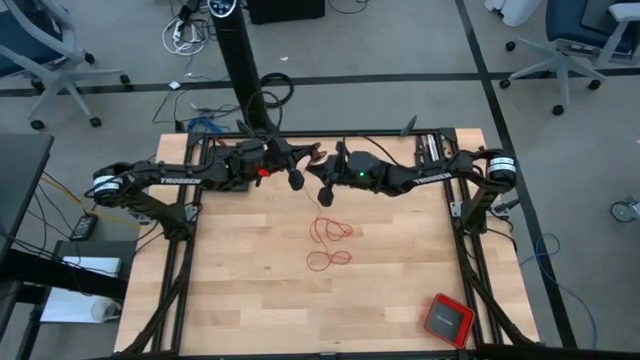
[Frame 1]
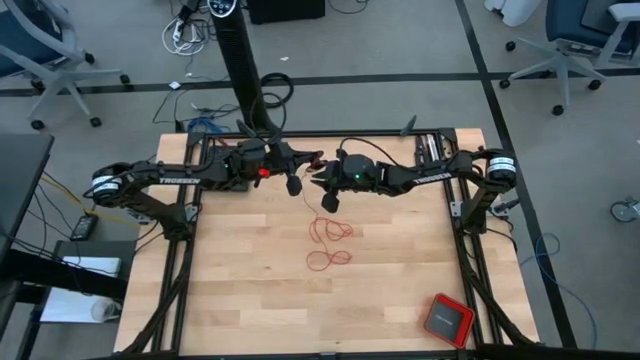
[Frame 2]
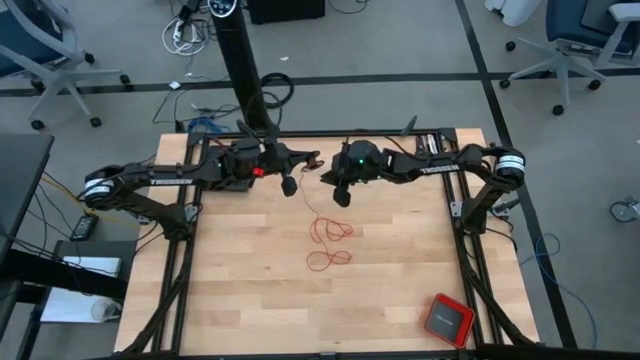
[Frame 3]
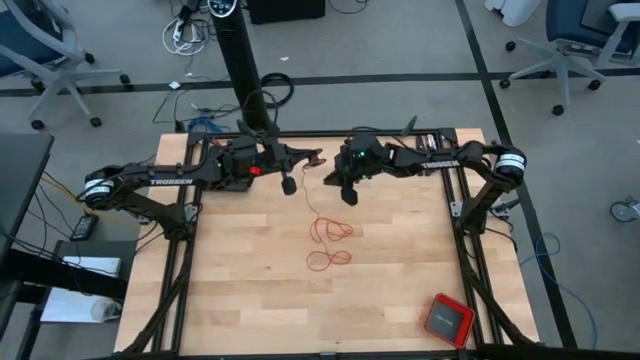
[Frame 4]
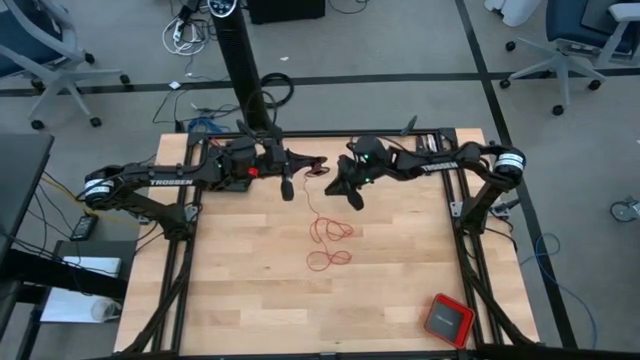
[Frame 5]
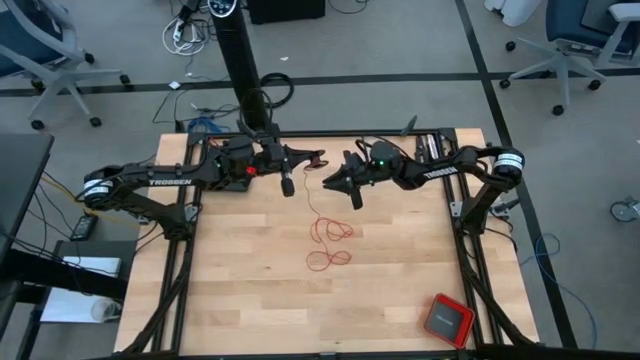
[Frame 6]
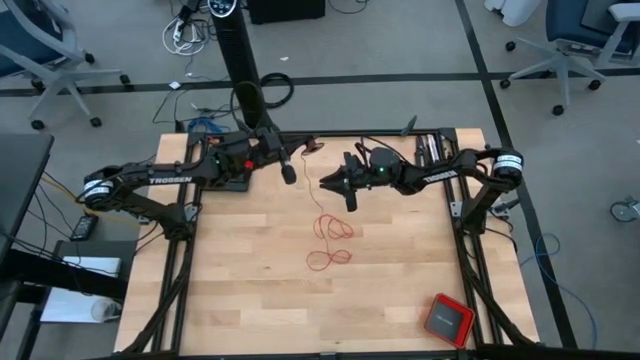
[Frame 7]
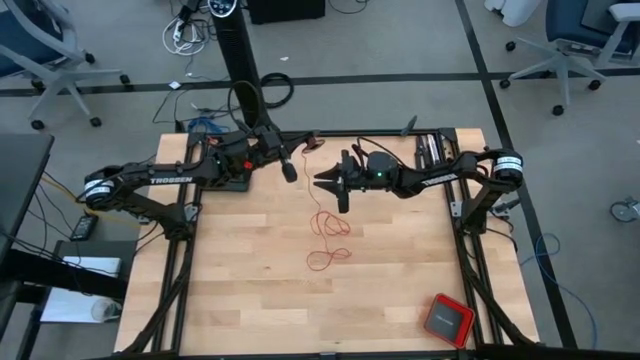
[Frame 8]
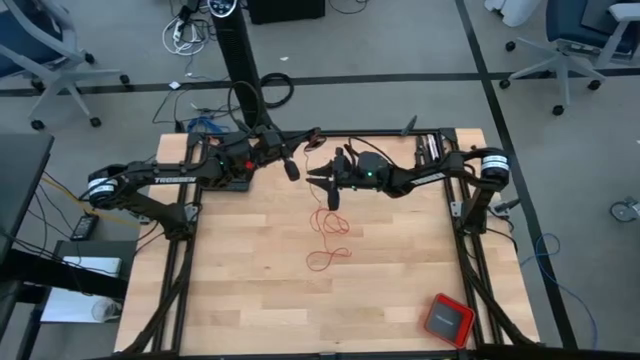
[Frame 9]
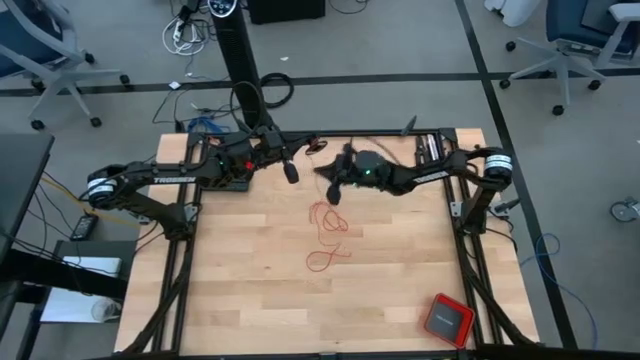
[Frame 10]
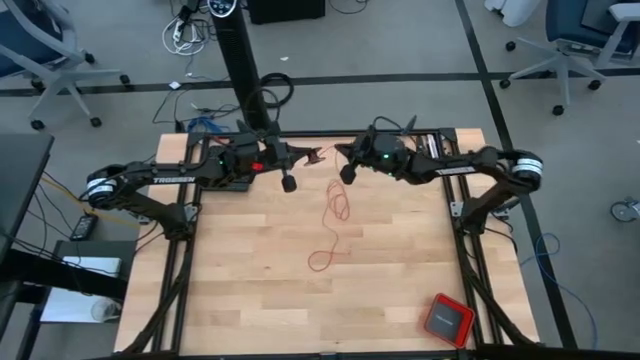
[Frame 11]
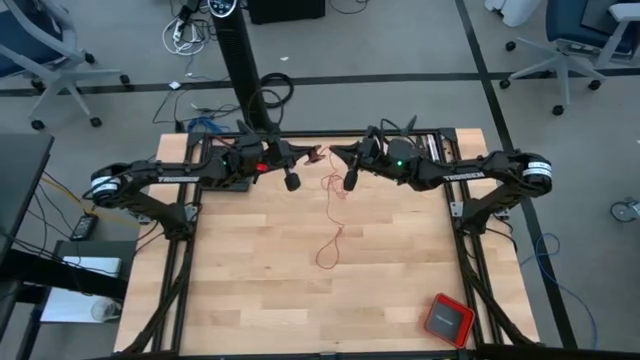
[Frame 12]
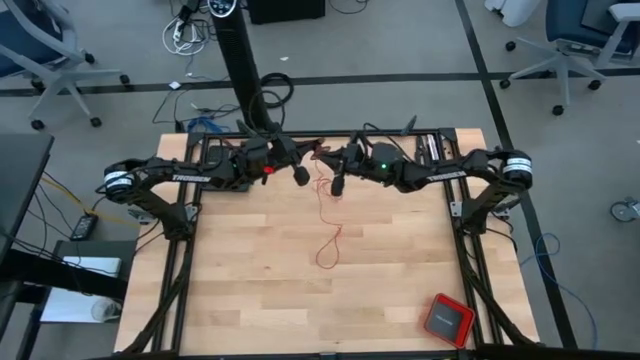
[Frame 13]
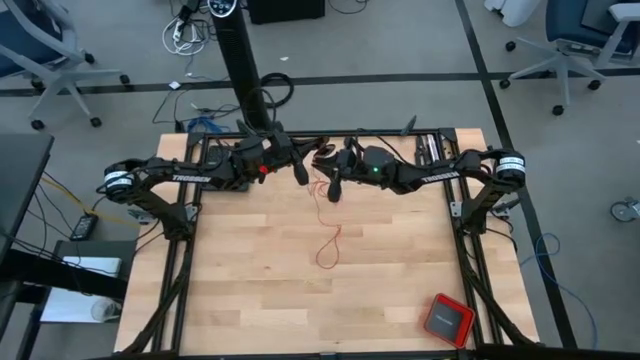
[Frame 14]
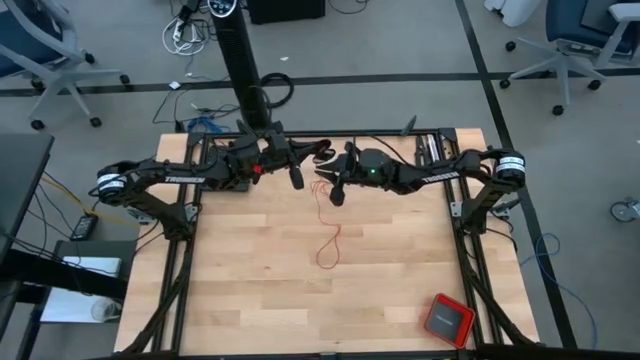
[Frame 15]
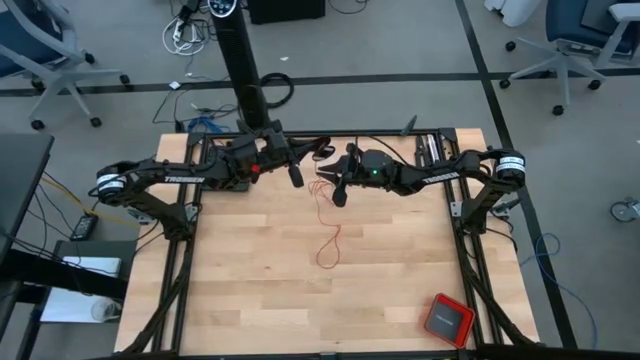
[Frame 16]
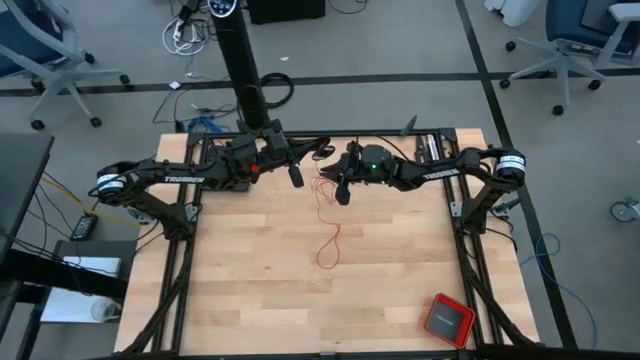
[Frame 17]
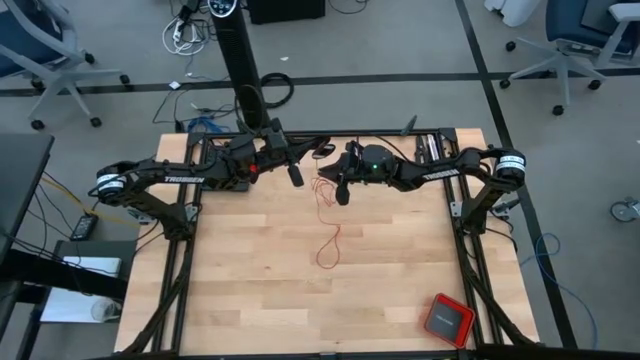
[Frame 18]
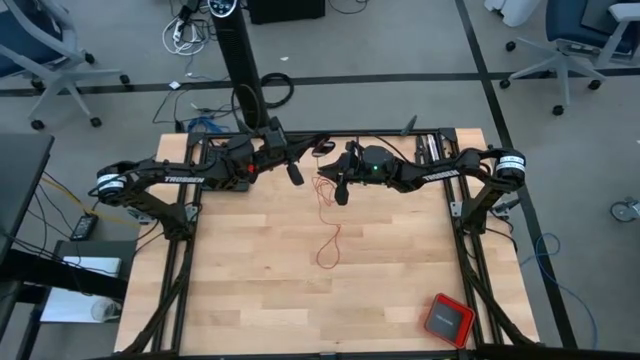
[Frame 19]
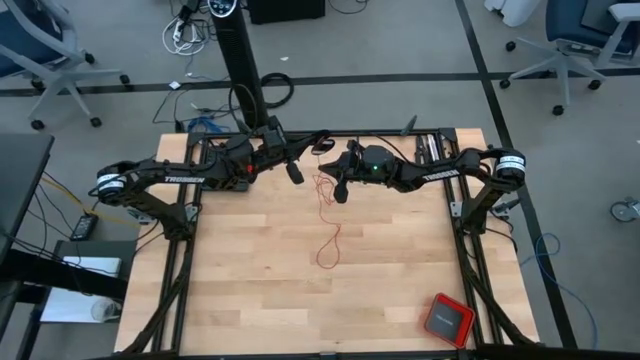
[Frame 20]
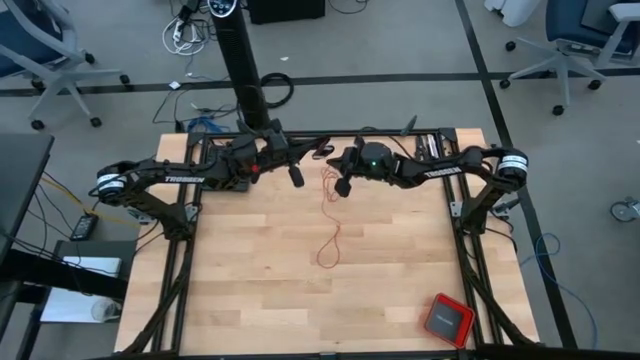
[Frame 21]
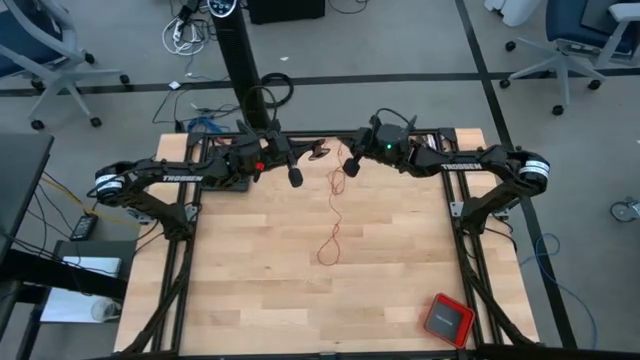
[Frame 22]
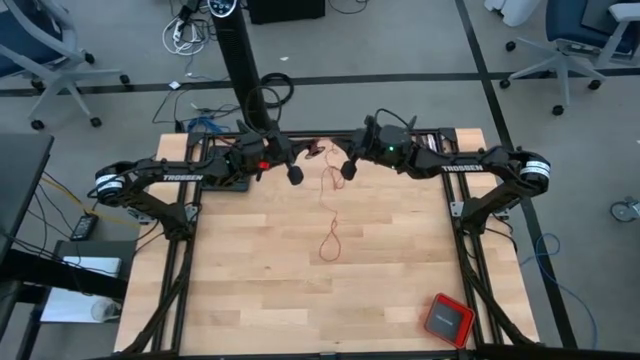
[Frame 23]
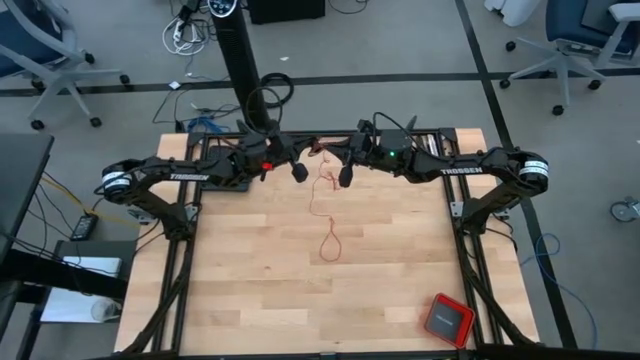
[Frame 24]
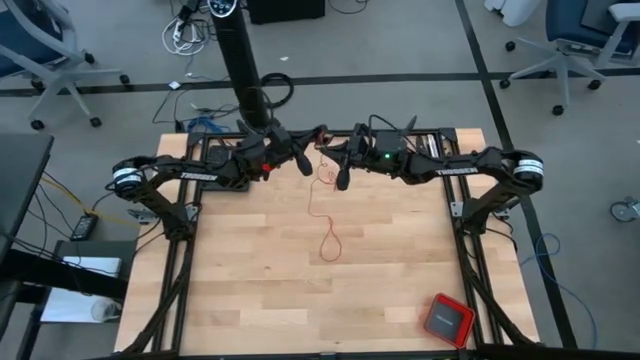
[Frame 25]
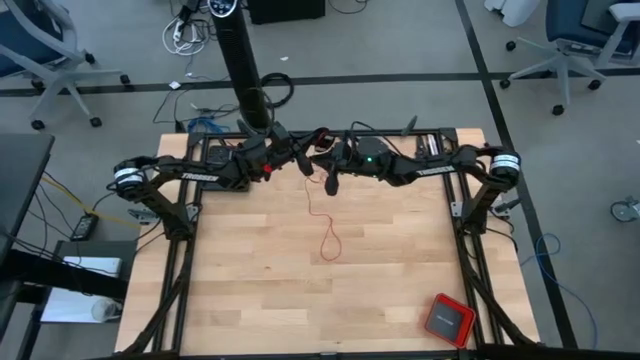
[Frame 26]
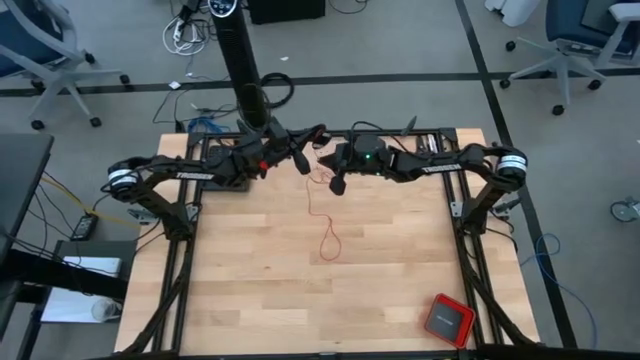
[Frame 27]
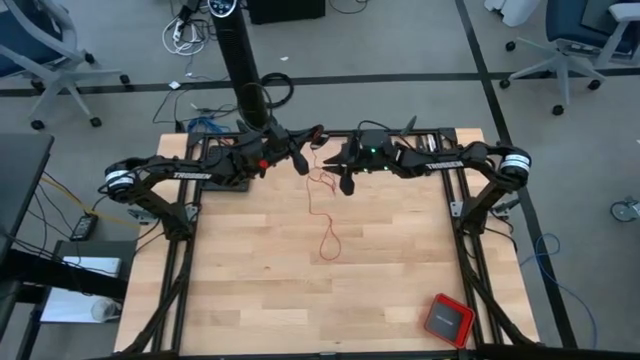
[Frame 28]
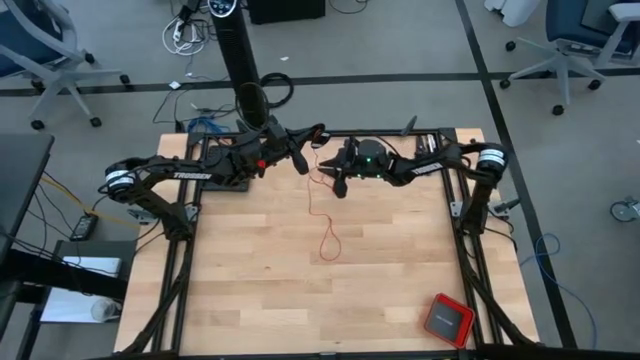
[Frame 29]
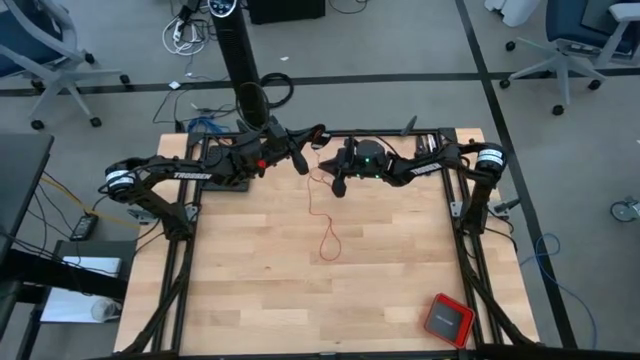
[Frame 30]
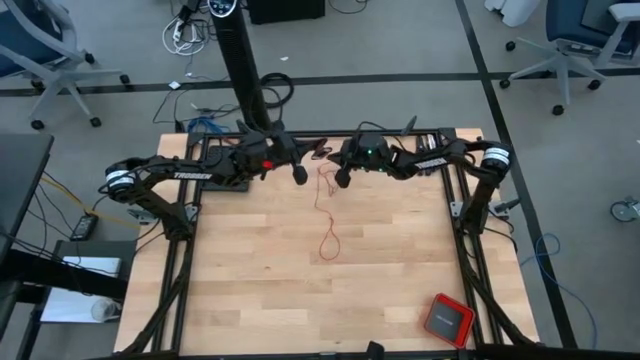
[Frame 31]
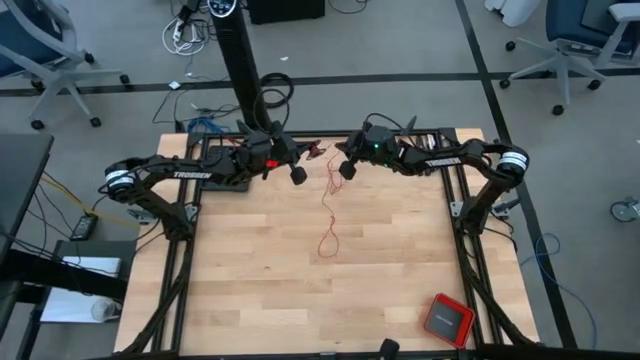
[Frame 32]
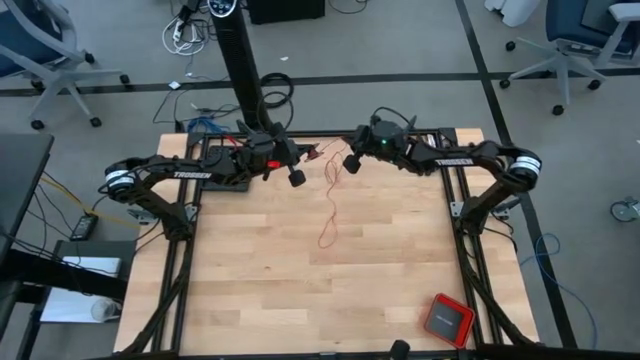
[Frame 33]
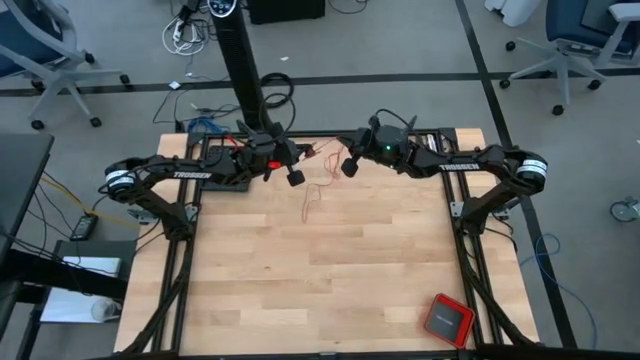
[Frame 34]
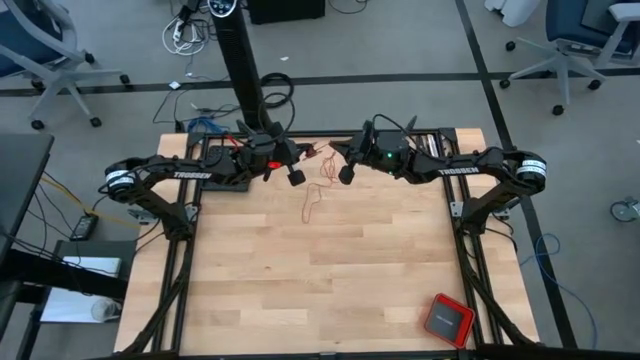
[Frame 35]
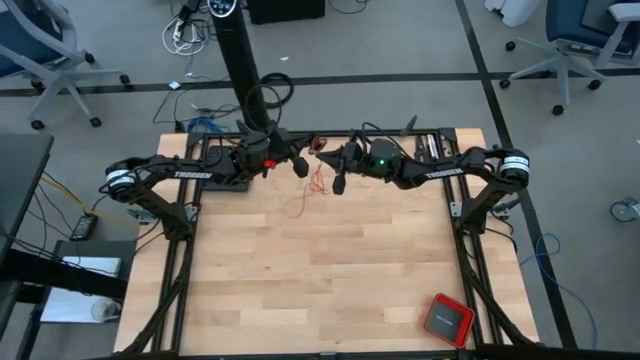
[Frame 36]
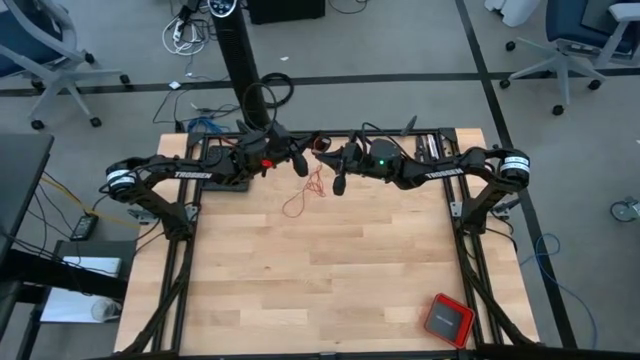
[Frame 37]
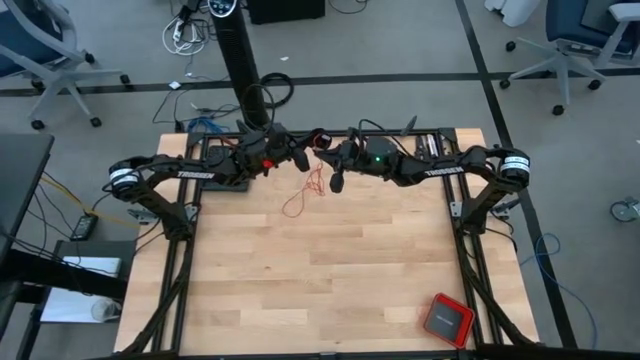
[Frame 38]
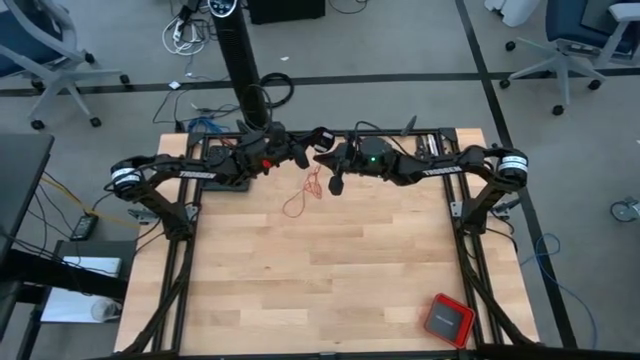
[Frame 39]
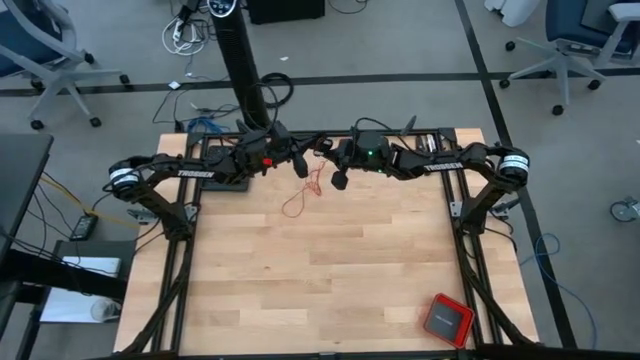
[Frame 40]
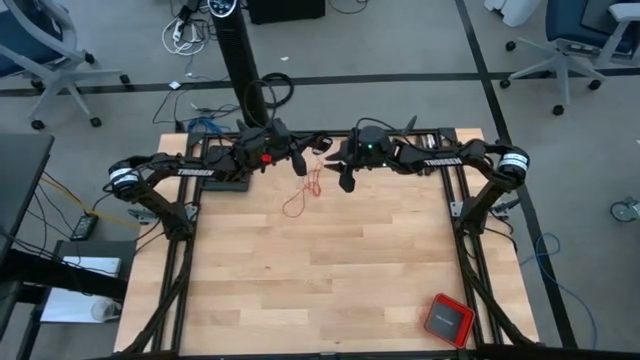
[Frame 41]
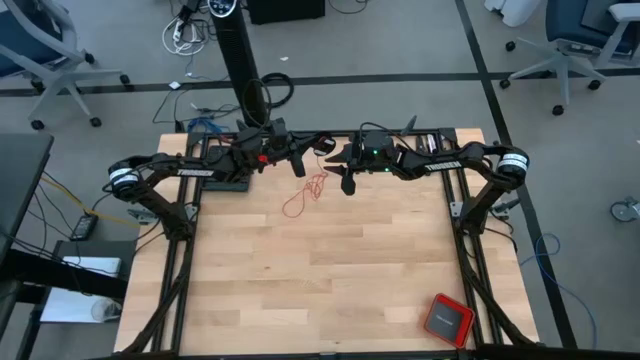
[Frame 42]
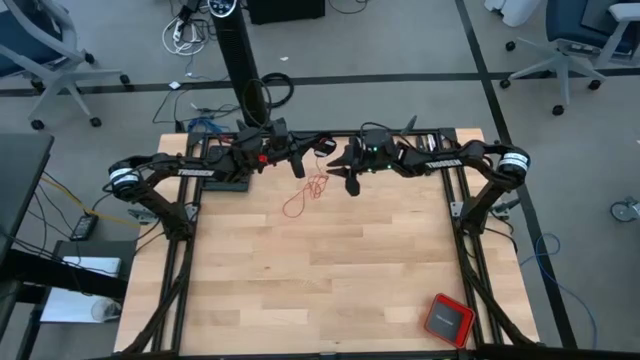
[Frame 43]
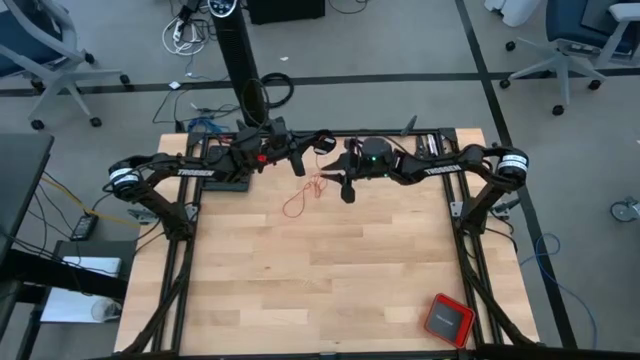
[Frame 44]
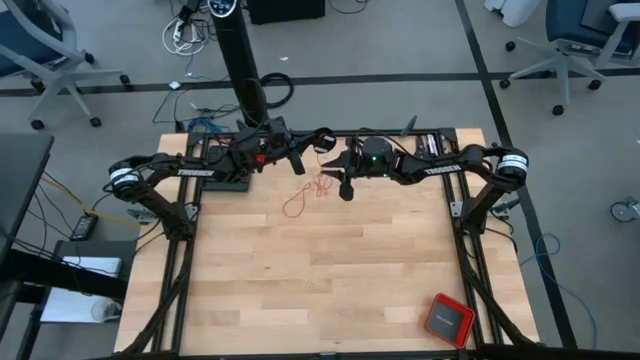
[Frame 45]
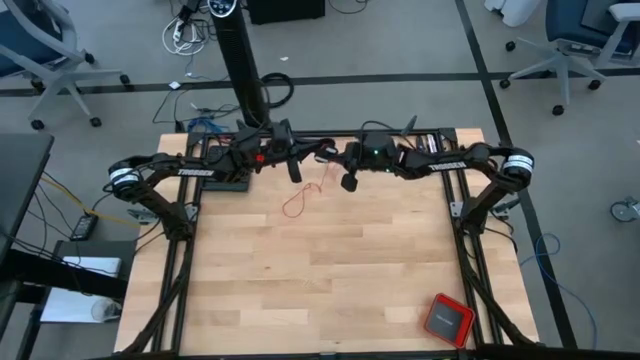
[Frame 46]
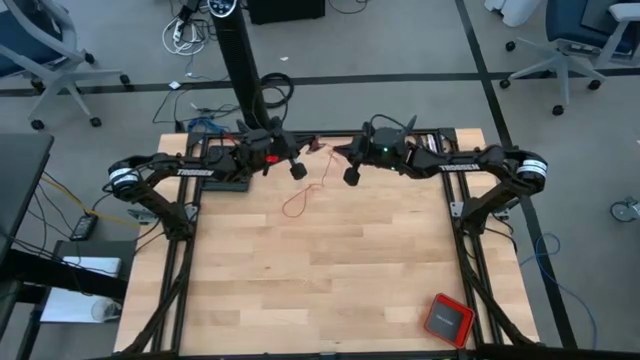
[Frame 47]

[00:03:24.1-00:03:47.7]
Task: Coil cords
Coil the red wire onto the spool
